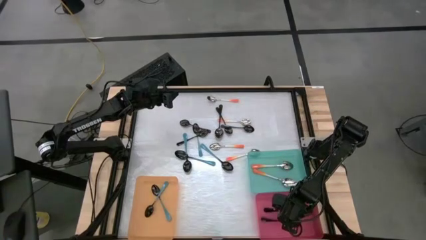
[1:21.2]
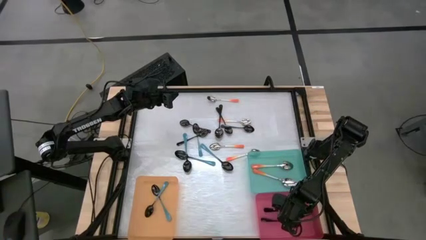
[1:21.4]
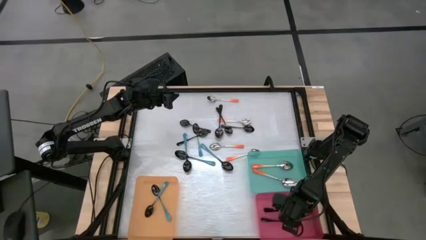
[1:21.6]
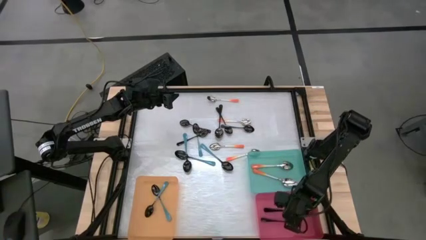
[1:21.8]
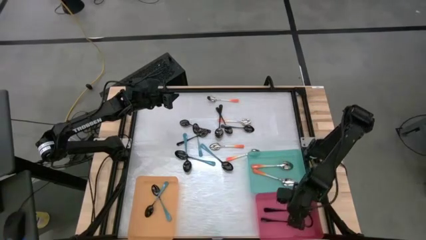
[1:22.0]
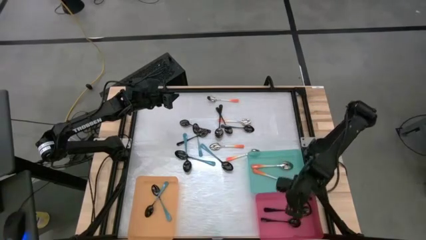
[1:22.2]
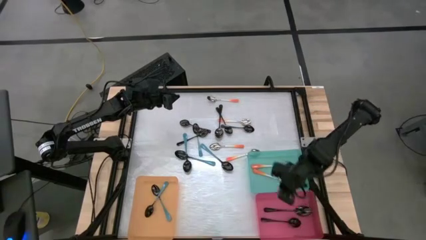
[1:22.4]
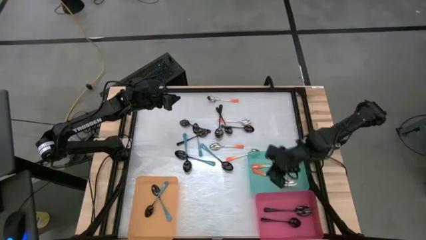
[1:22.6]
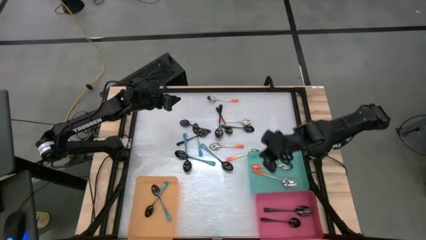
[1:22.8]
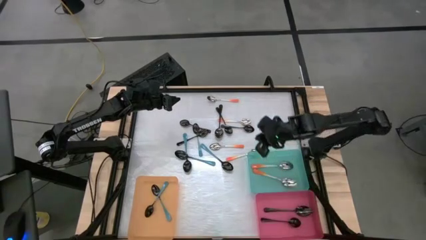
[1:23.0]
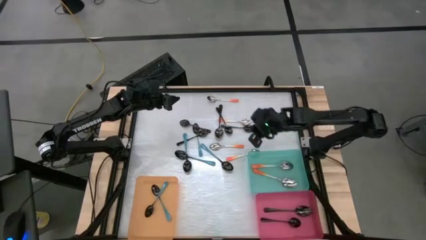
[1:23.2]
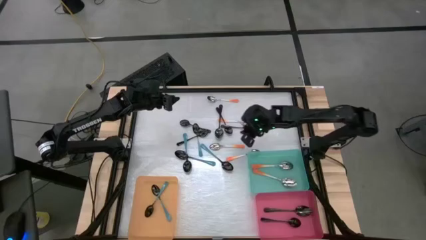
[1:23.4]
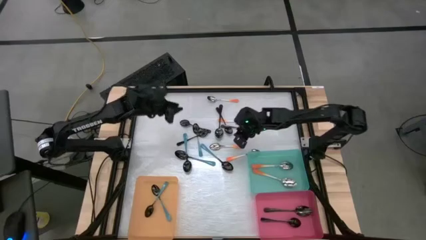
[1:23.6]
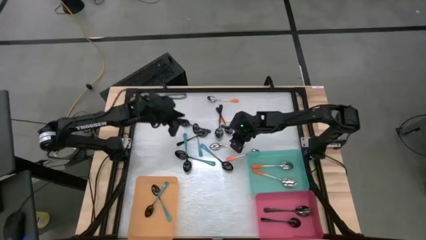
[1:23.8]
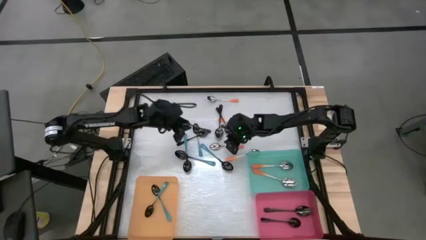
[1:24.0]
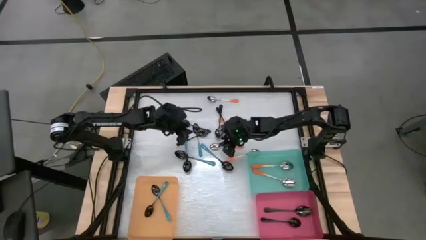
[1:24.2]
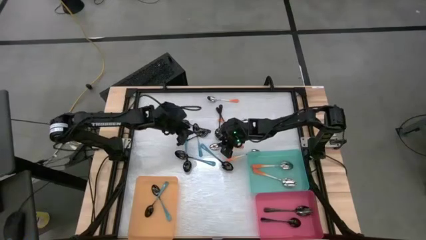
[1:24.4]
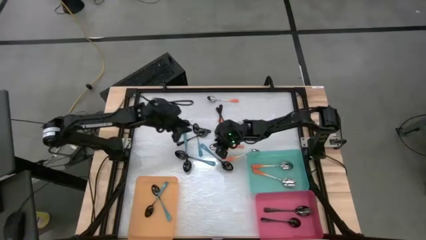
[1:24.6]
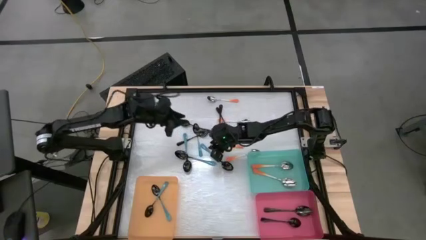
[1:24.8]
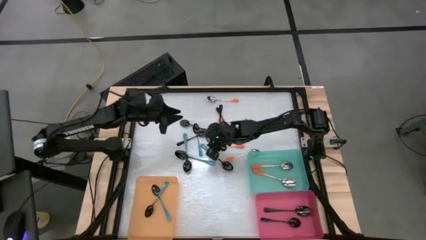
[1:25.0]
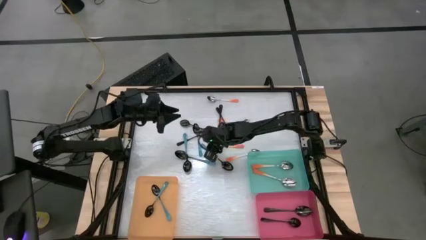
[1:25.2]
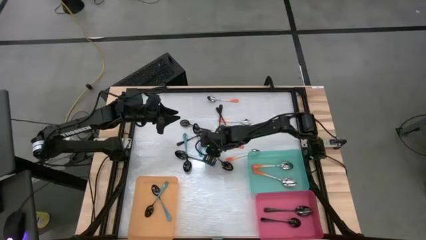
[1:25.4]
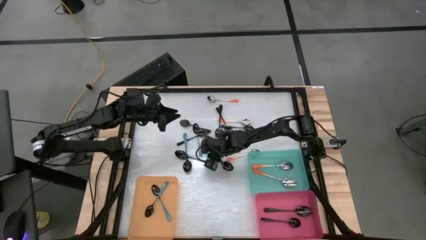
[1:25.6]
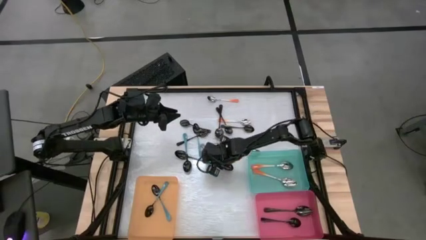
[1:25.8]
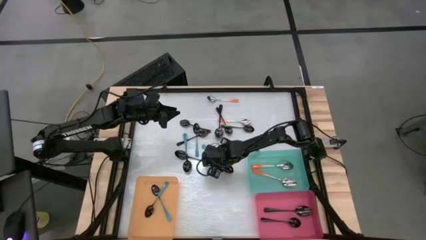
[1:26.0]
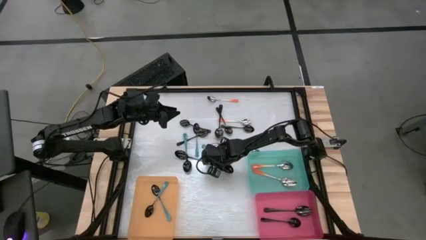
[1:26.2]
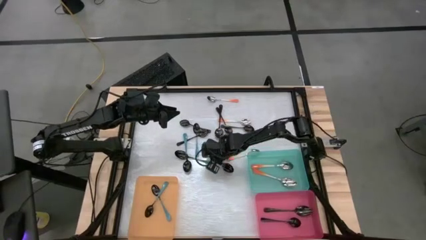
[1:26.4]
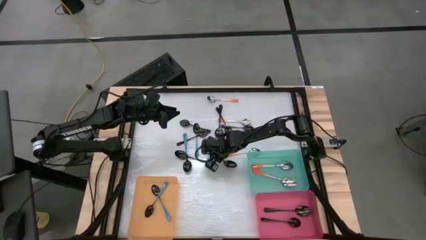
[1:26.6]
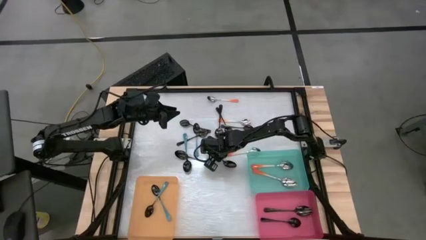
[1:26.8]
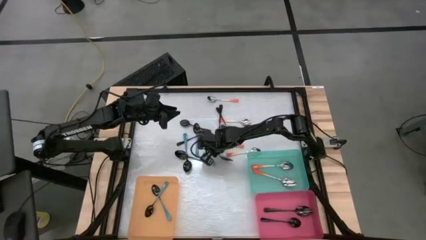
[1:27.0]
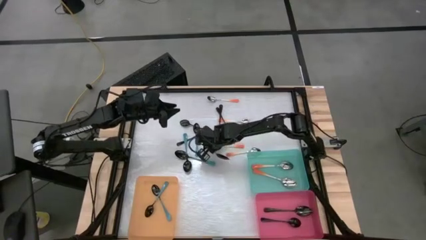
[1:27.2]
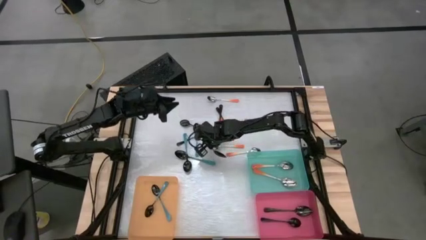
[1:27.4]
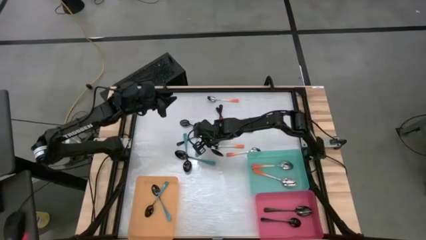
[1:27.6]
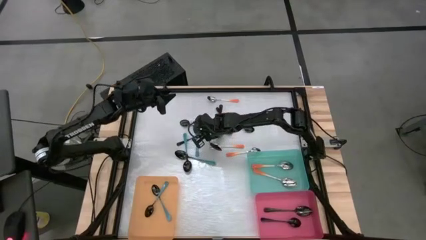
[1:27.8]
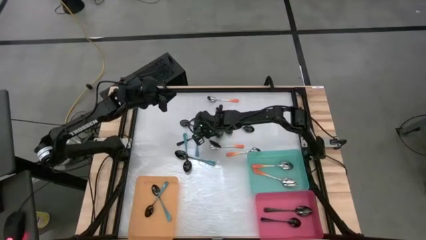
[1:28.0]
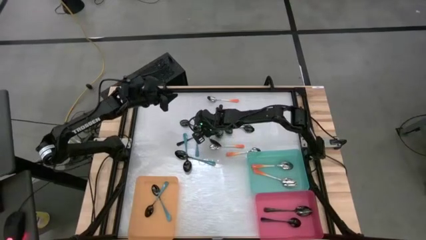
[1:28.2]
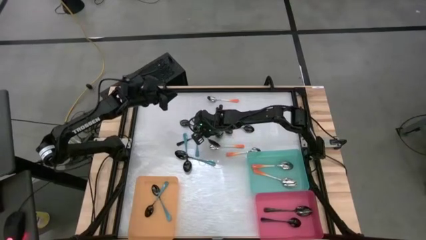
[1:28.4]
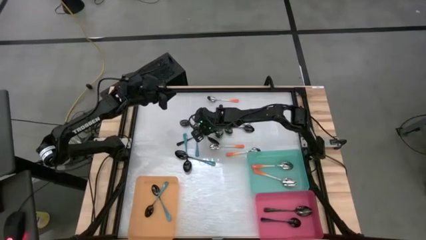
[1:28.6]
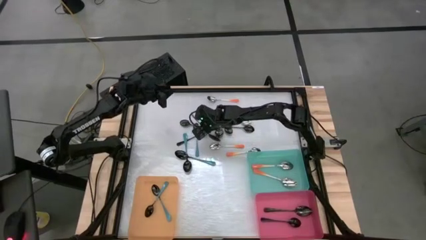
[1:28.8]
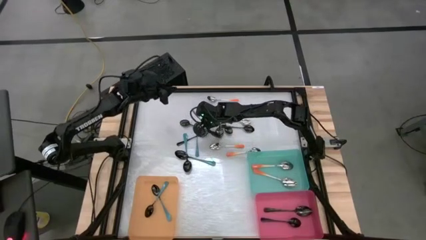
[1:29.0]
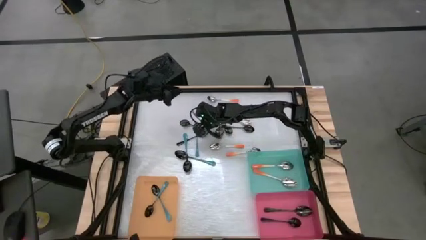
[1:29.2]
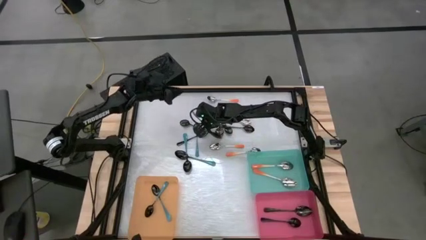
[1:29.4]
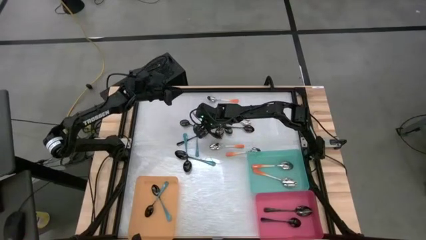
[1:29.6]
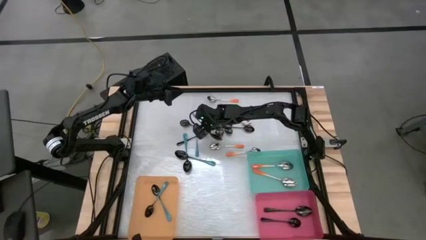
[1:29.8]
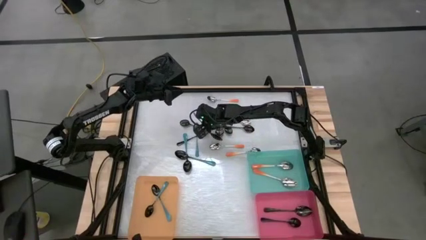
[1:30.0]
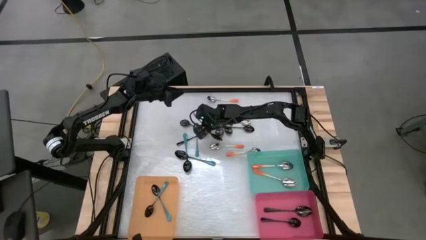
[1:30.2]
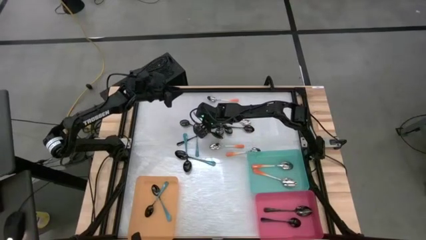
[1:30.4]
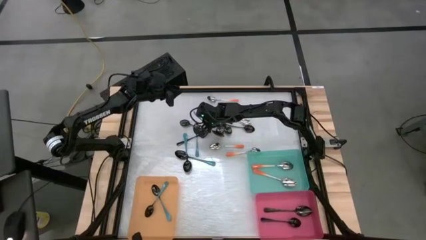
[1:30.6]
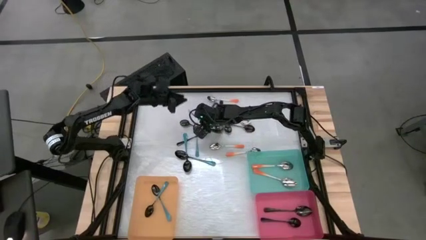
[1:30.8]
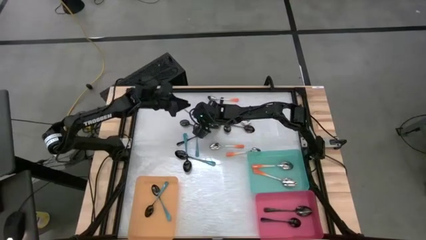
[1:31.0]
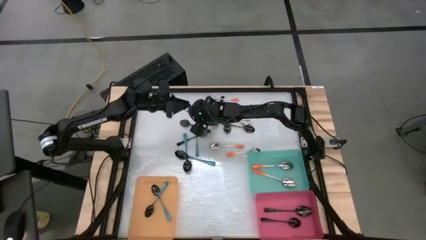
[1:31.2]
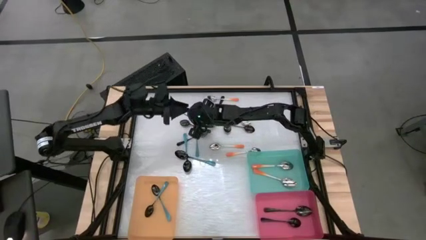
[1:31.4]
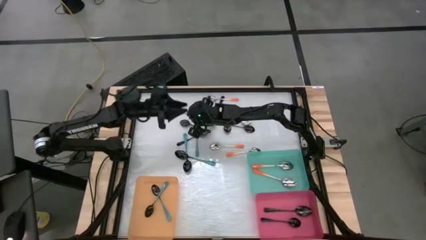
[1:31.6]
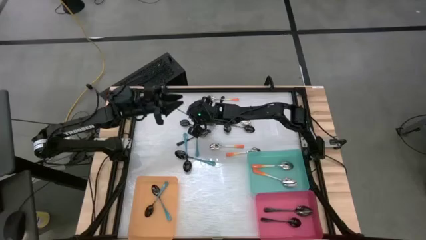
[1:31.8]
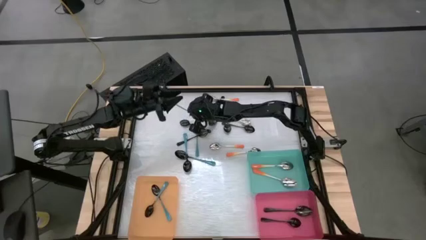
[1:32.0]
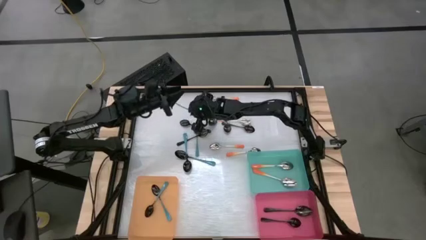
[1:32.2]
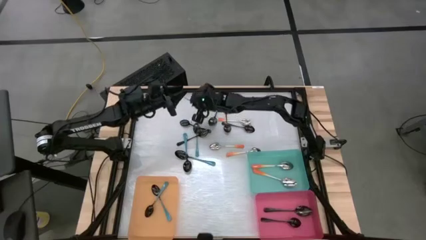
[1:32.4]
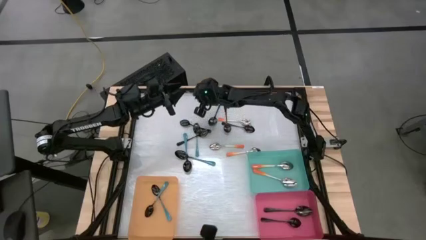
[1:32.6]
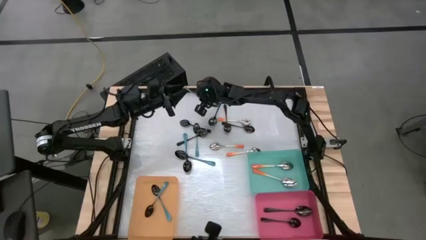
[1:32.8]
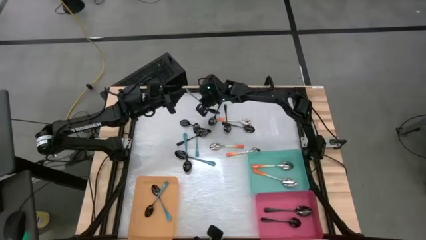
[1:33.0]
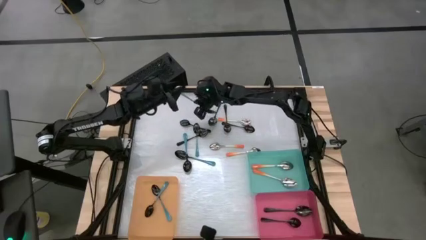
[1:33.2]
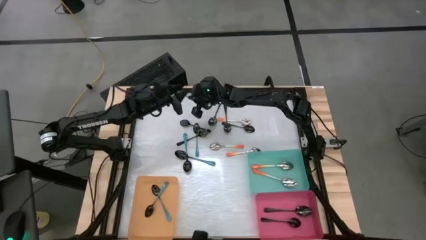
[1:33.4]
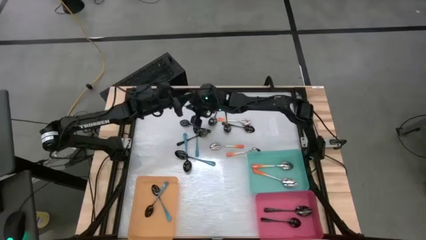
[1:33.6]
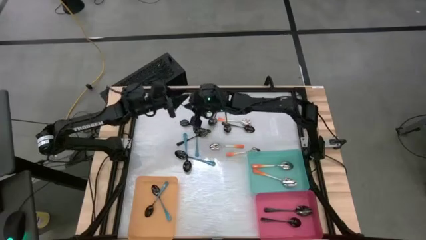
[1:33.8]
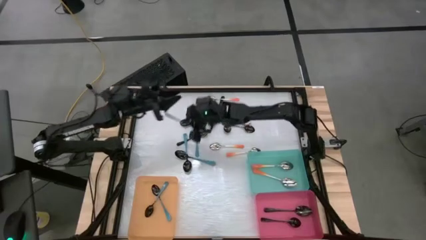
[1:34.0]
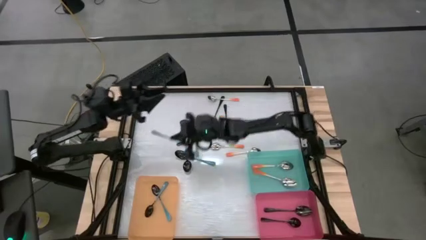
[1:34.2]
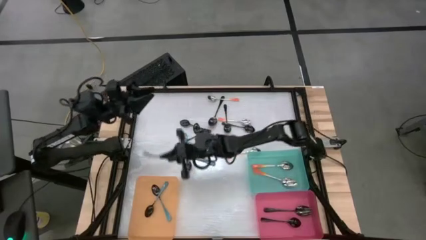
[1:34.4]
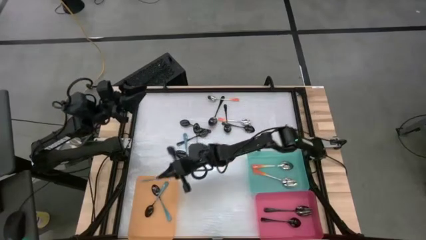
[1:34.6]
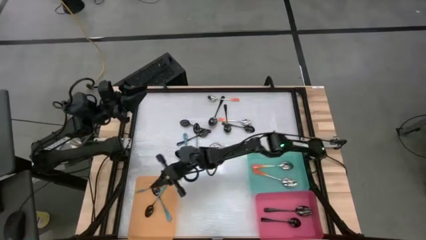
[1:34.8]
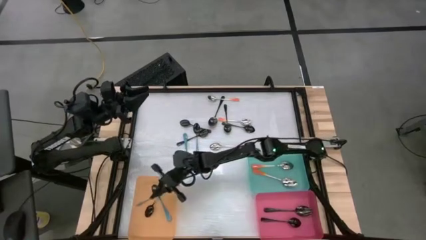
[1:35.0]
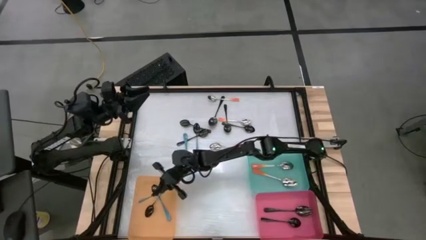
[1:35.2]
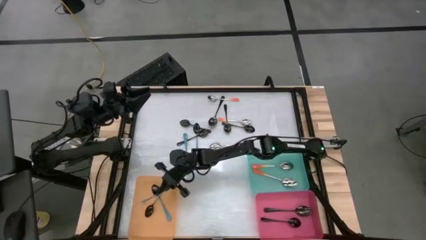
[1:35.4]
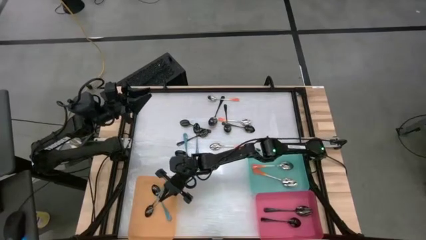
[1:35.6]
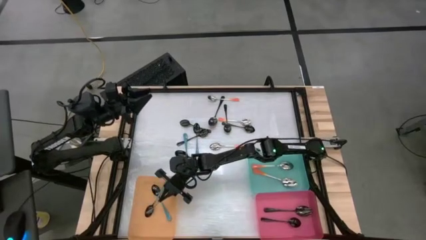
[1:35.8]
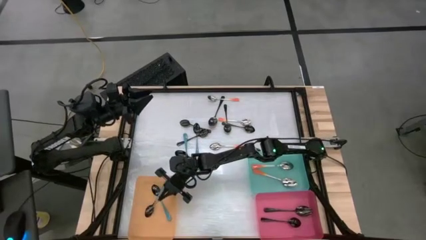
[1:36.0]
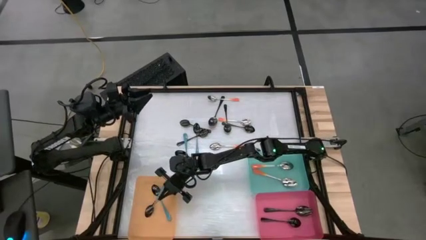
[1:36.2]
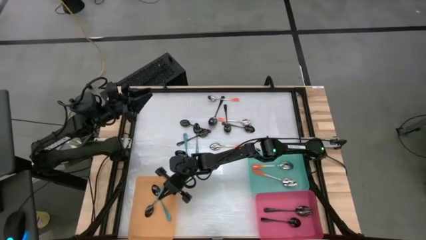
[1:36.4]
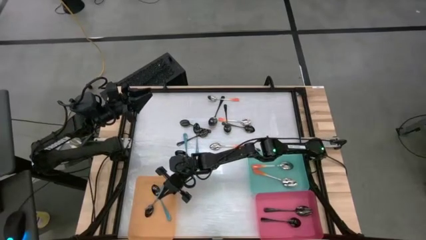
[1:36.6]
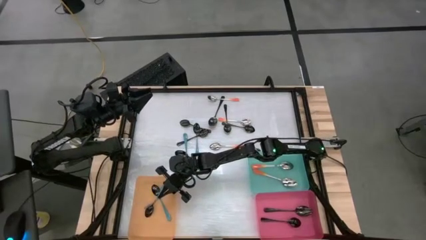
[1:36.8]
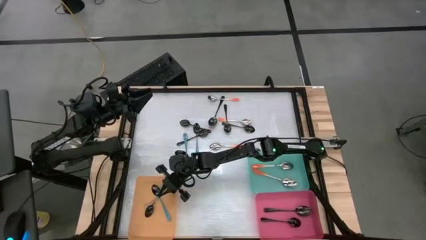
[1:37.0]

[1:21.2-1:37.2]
Task: Sort silverware by color (type)
Put the blue spoon into the orange bin
